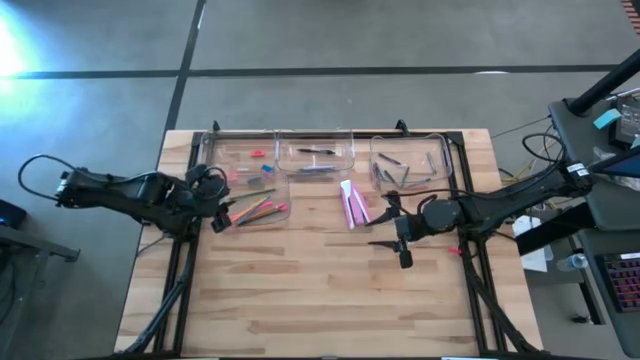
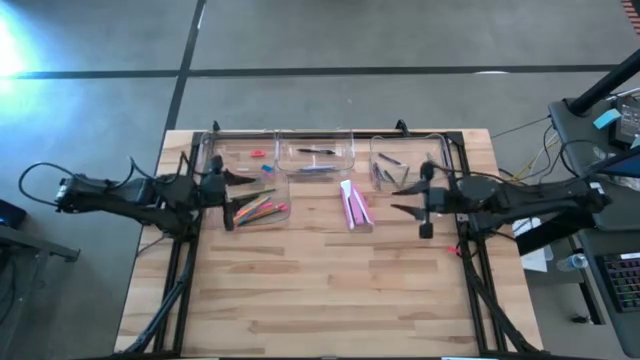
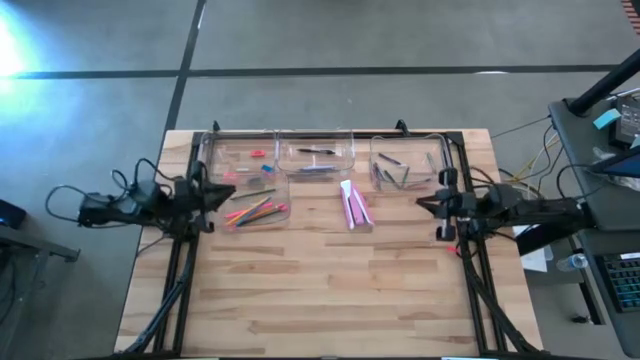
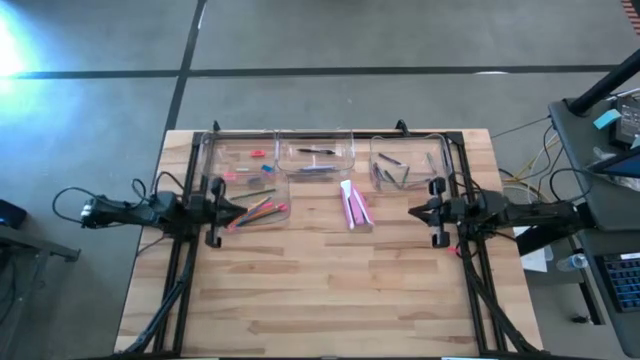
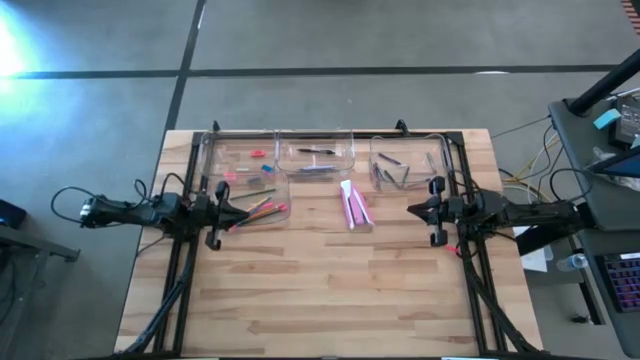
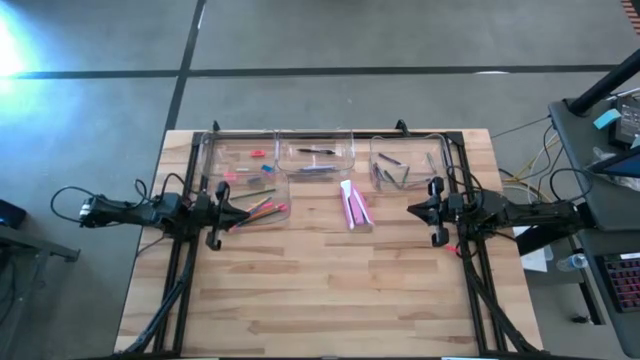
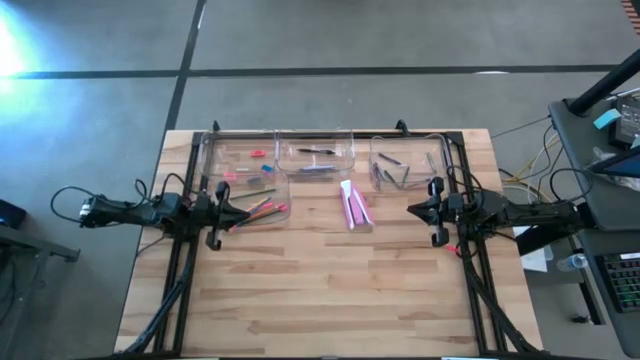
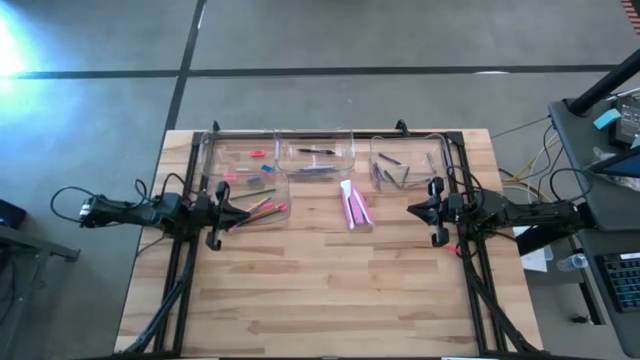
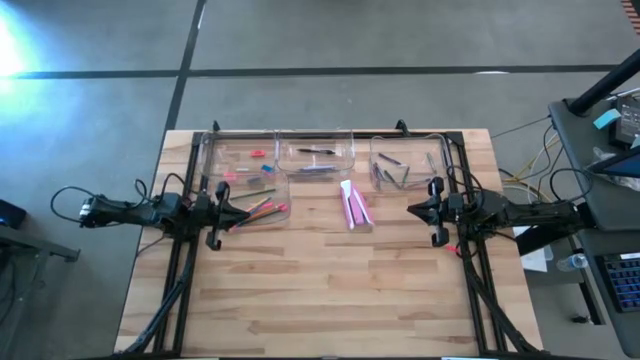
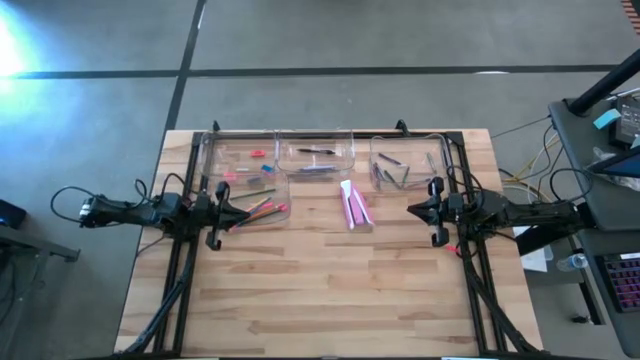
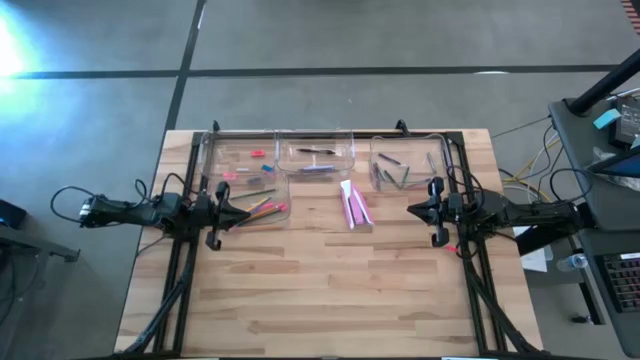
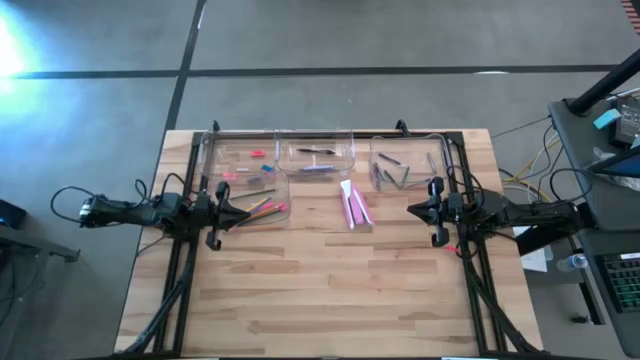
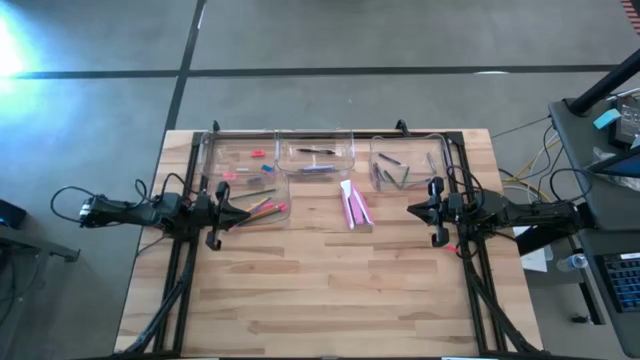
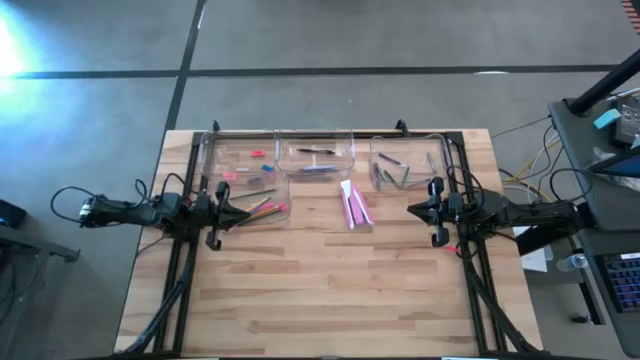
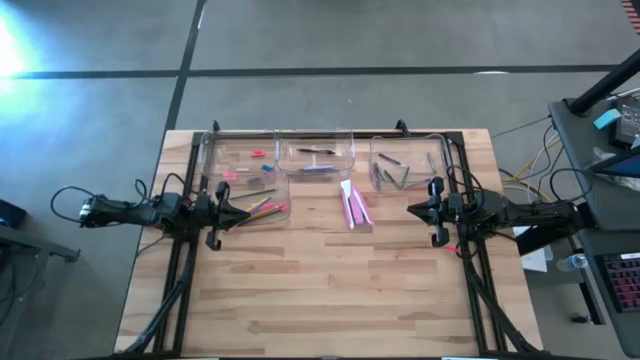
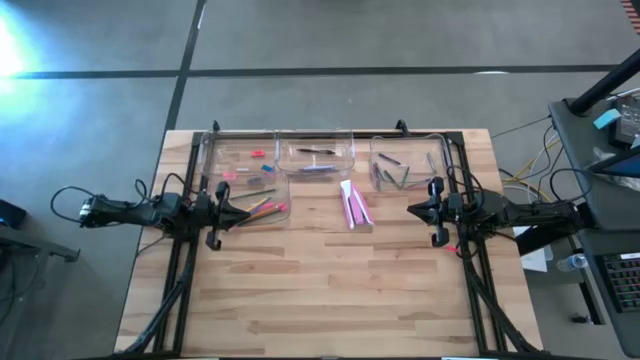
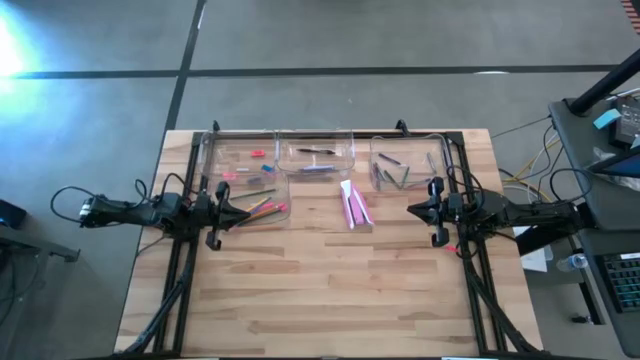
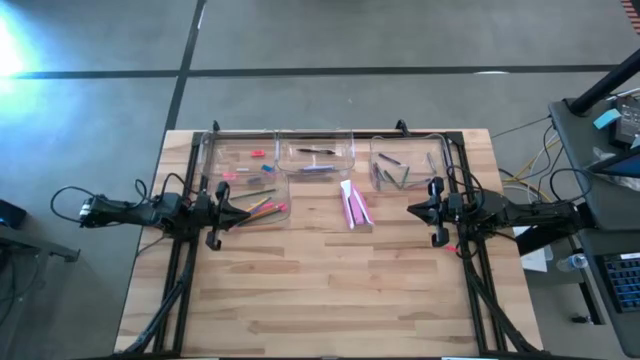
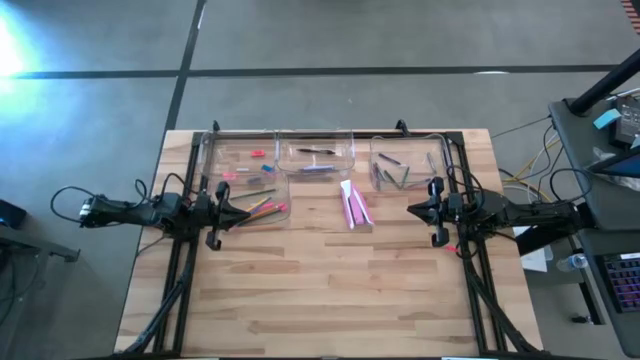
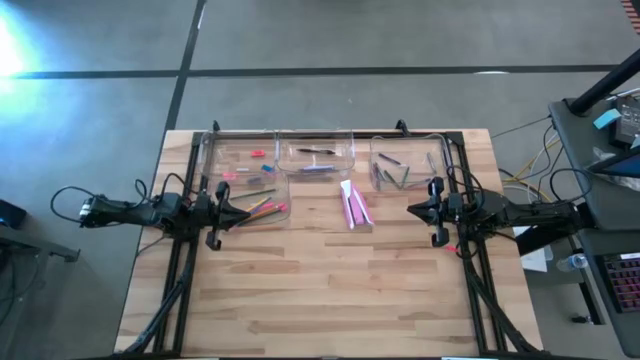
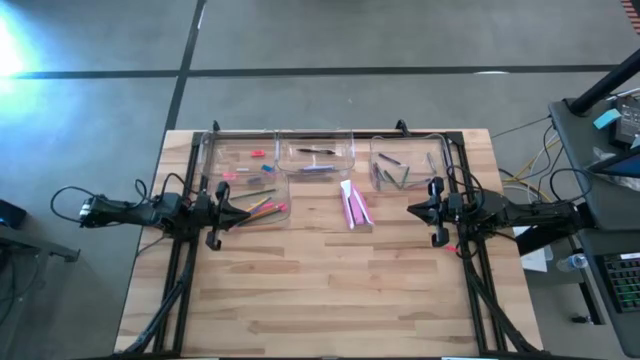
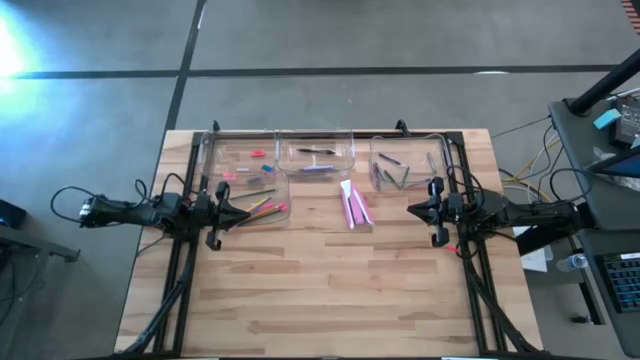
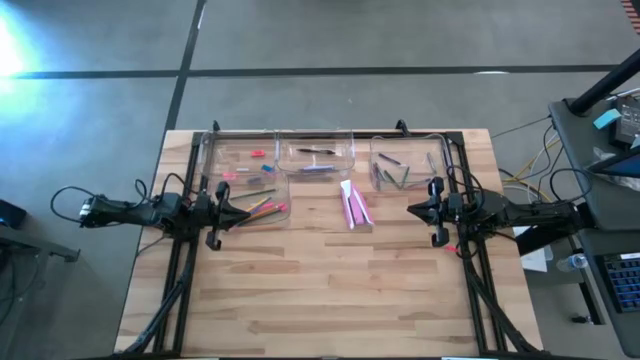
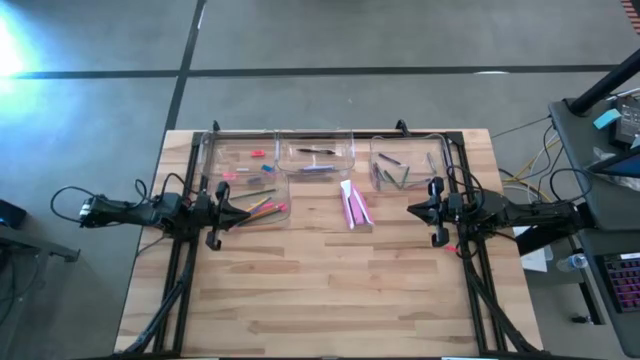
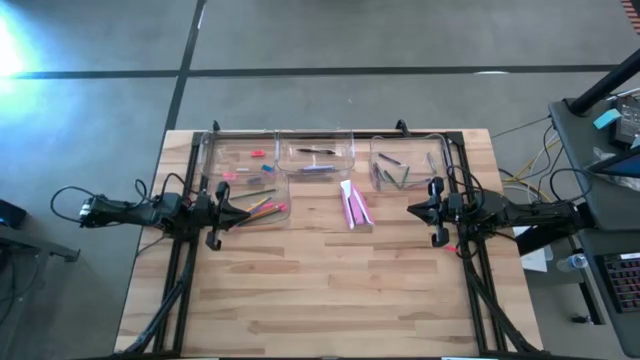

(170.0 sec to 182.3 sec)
Task: Sort crayons/erasers/pens/pencils in bins
Return to Home Position

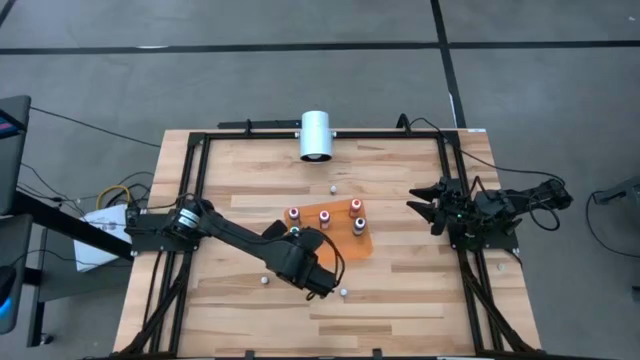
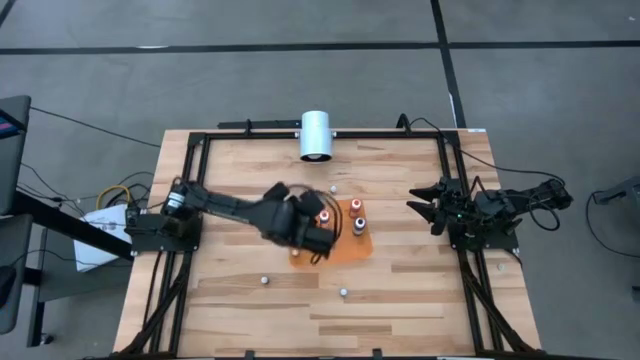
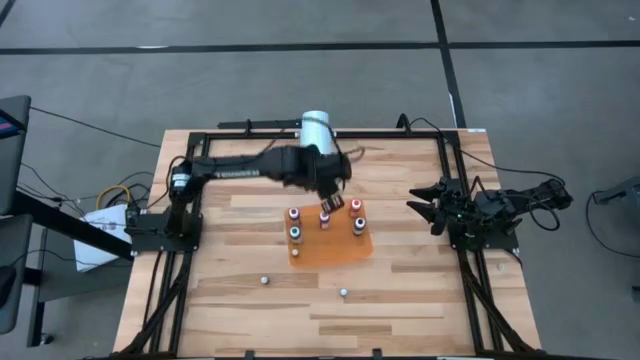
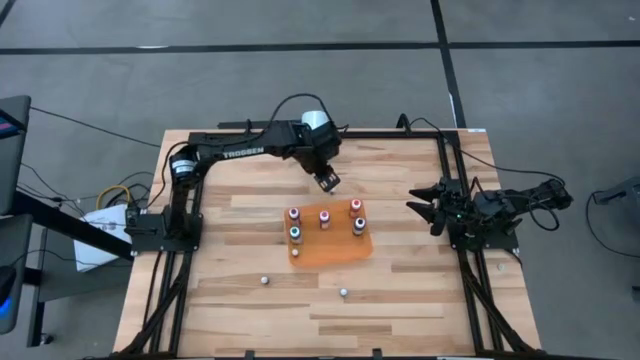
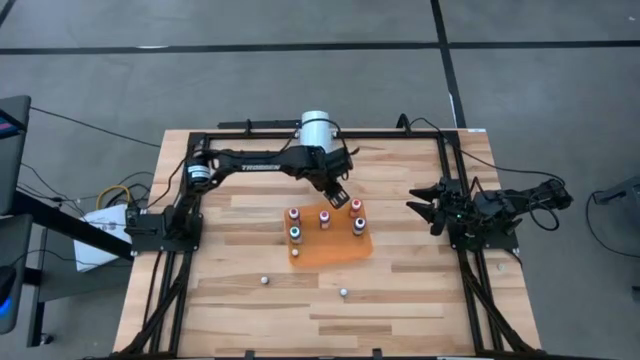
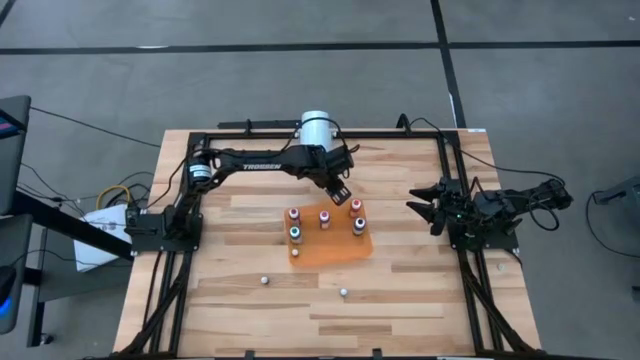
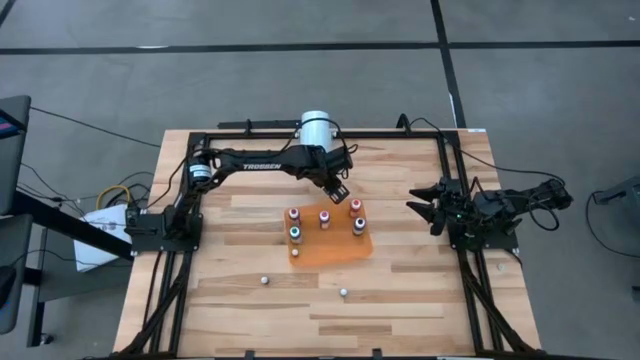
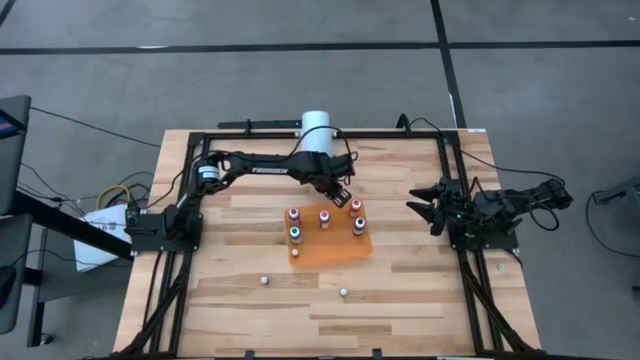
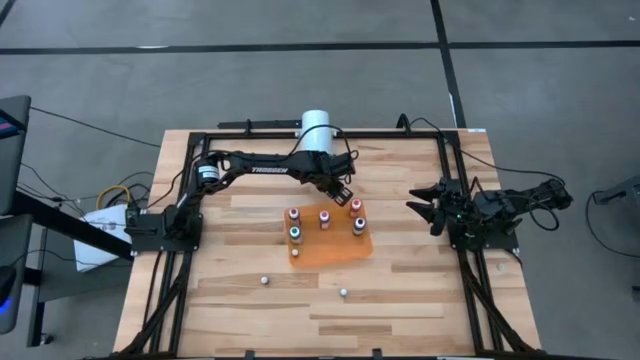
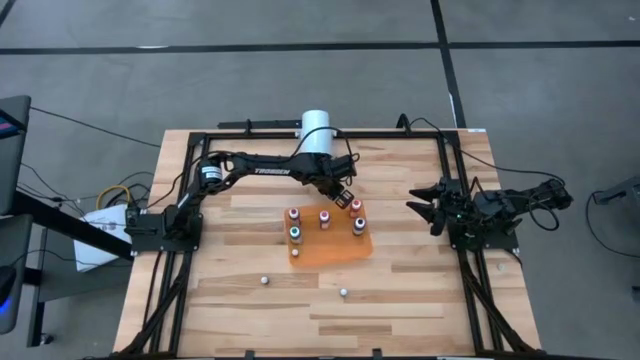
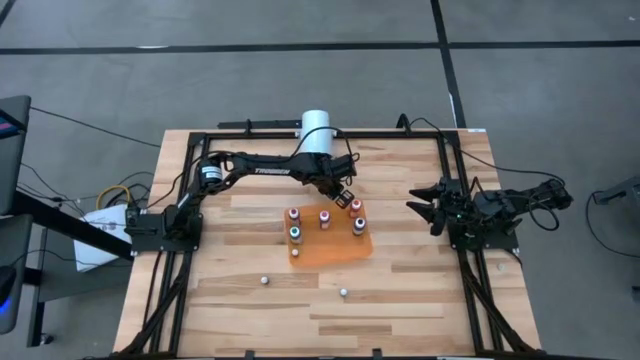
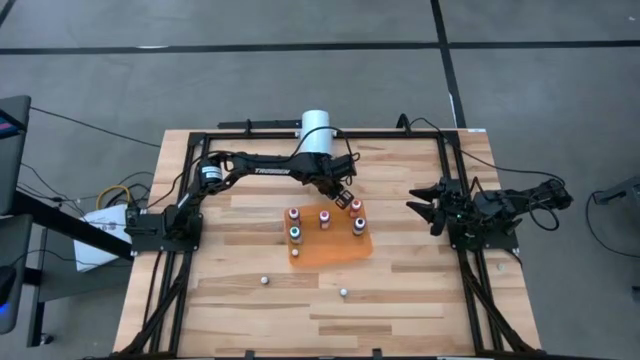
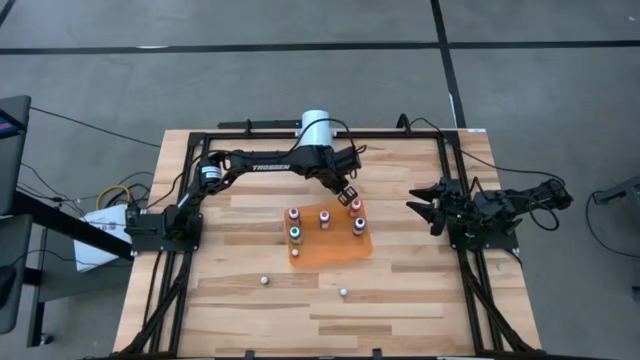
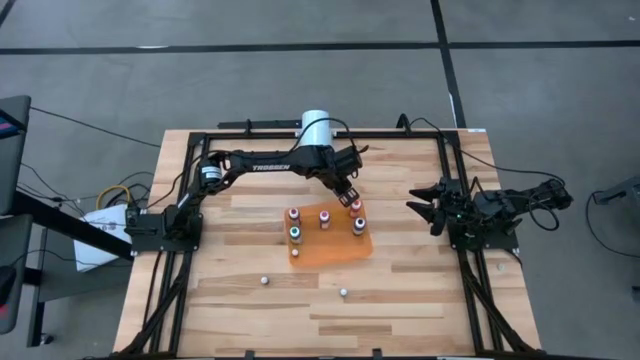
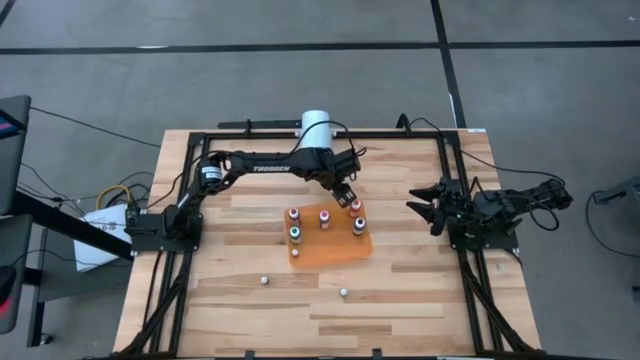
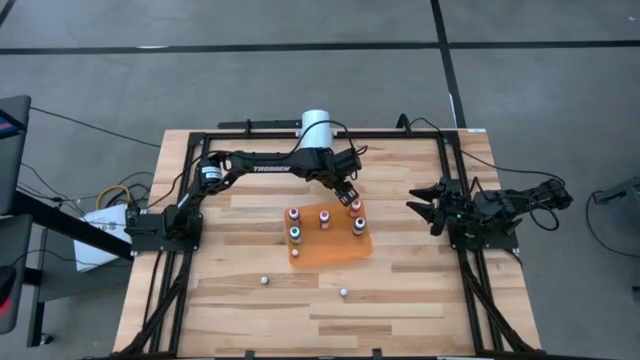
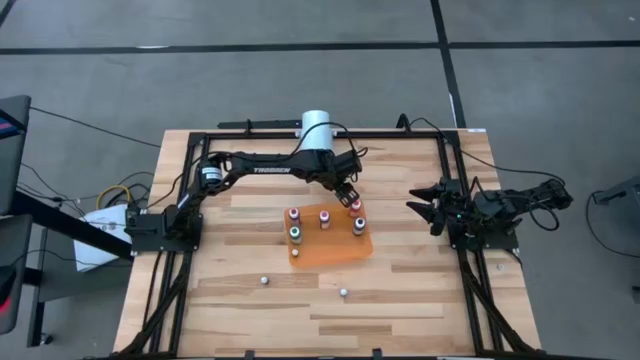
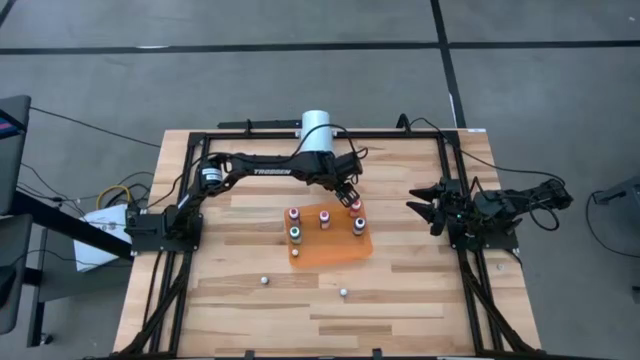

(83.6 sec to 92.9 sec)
Task: Pick & Place food coloring
Put the small brown food coloring bottle into the orange container
